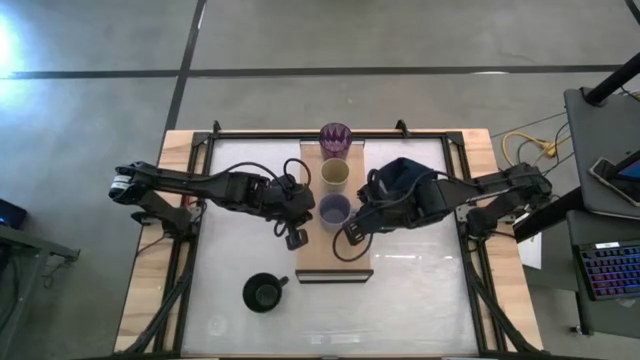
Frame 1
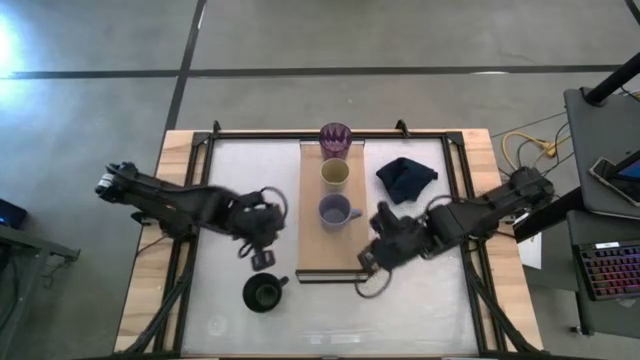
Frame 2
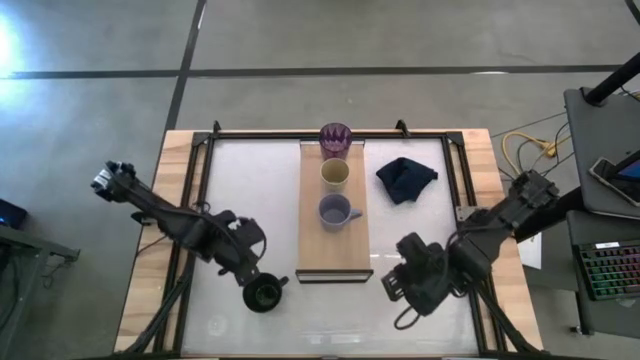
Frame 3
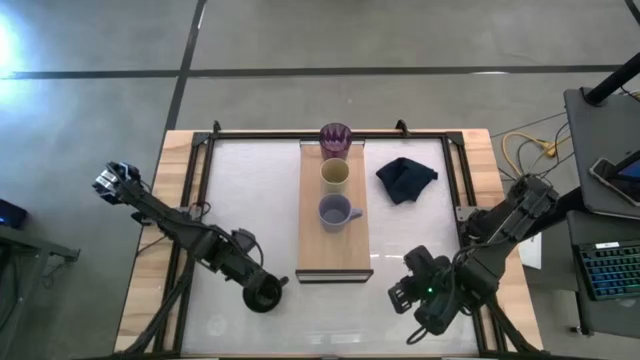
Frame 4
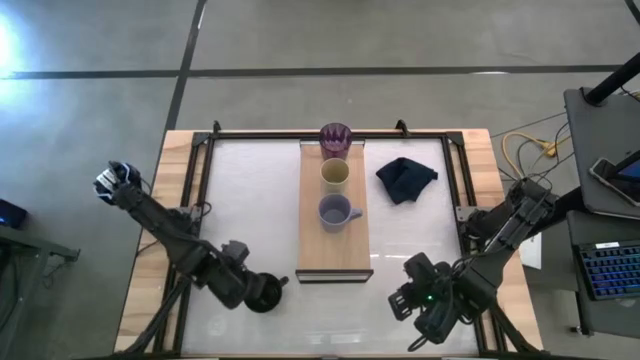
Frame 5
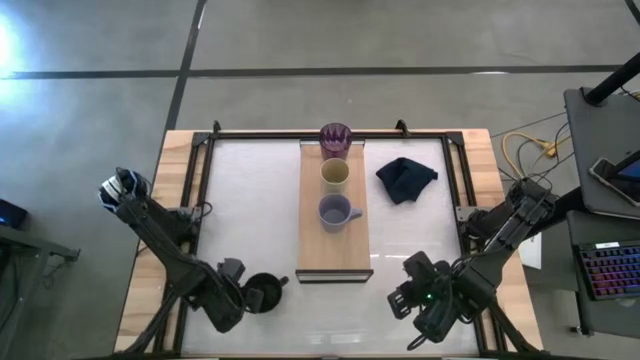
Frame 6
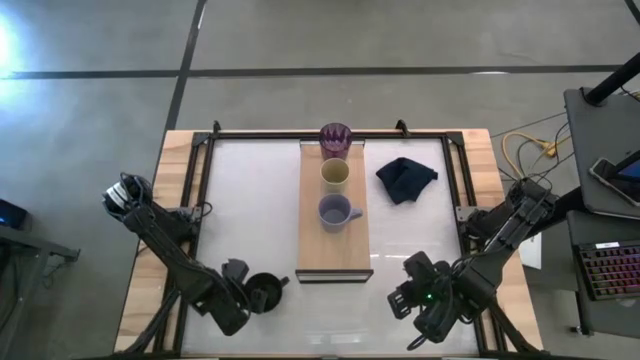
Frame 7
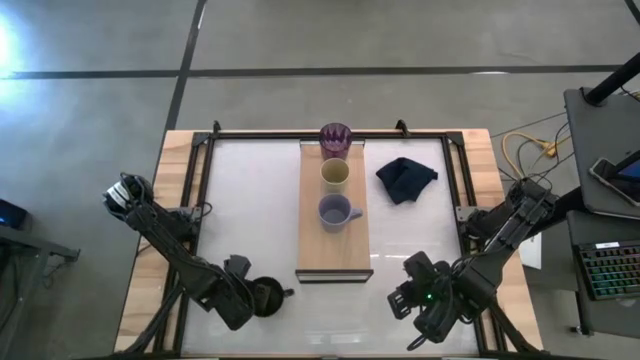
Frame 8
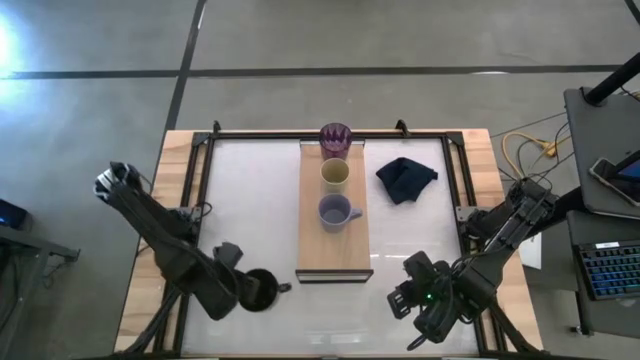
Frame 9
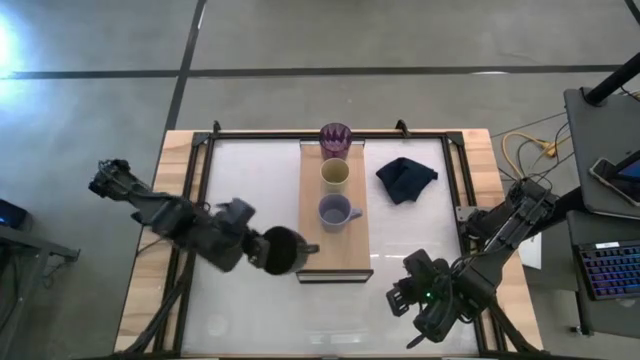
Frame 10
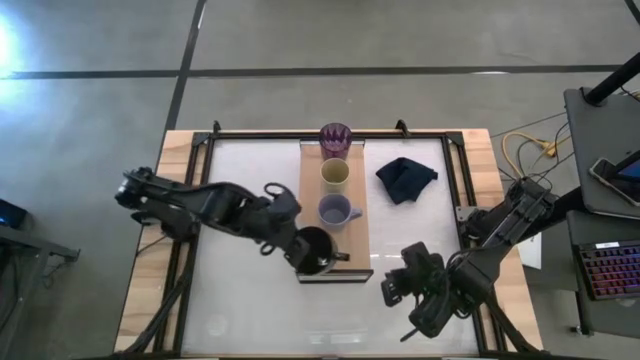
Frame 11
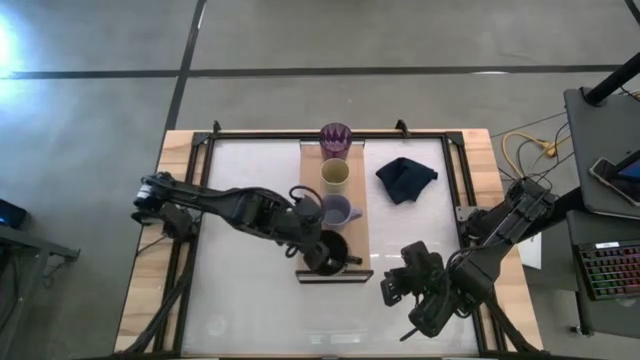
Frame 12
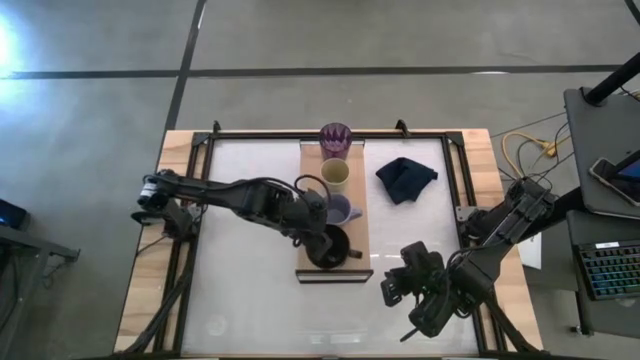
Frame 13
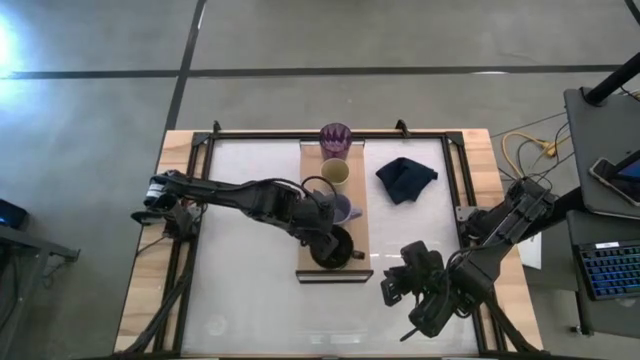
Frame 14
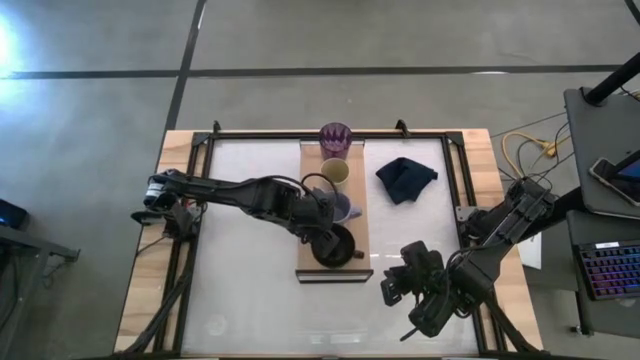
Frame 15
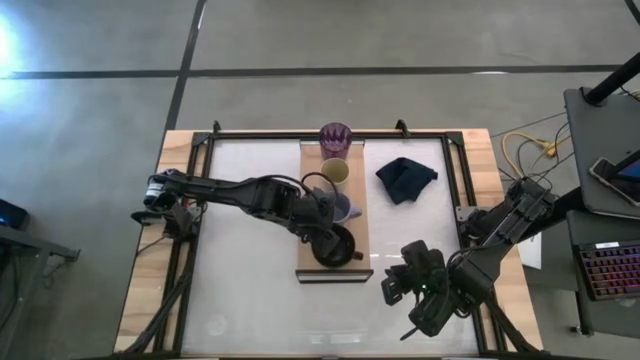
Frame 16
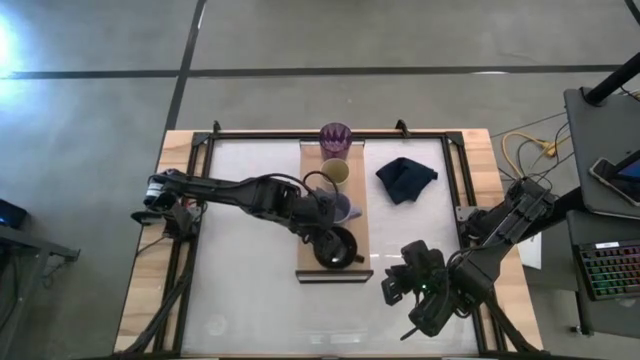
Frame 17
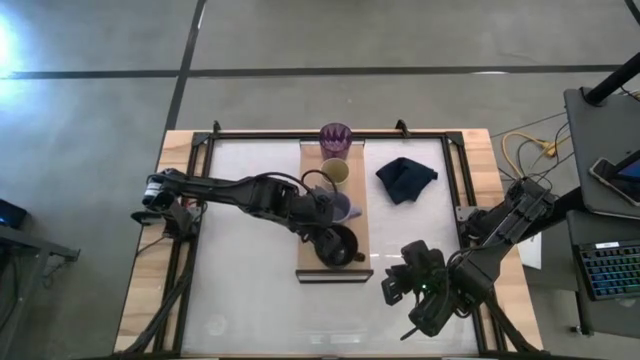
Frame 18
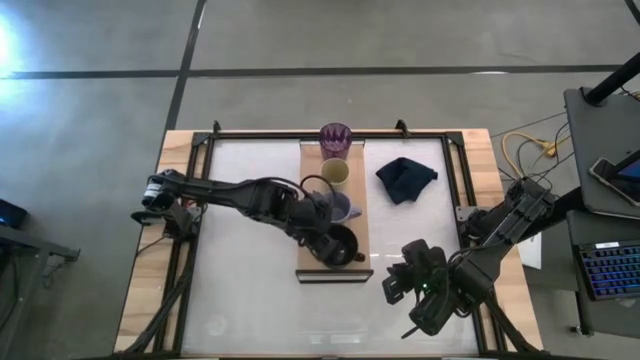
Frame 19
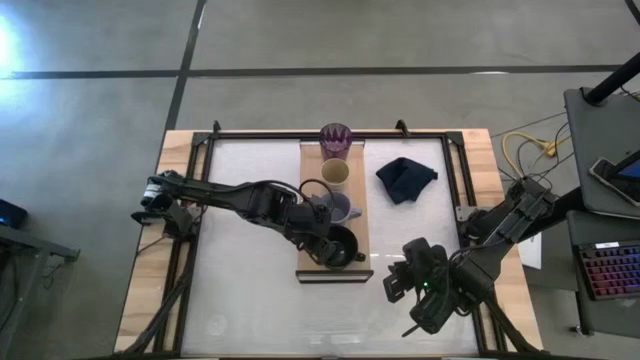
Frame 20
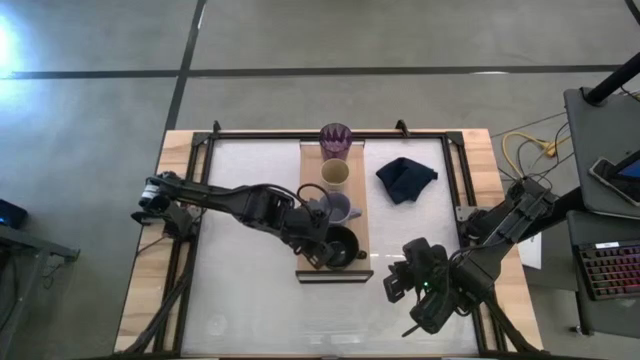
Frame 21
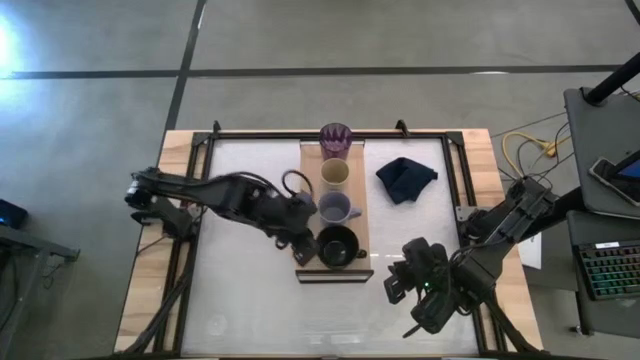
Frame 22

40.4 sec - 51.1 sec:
Task: Stack small to large cups/mugs on shelf
Put the black mug on the shelf

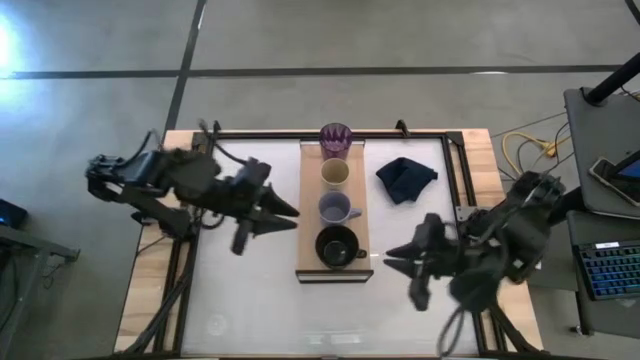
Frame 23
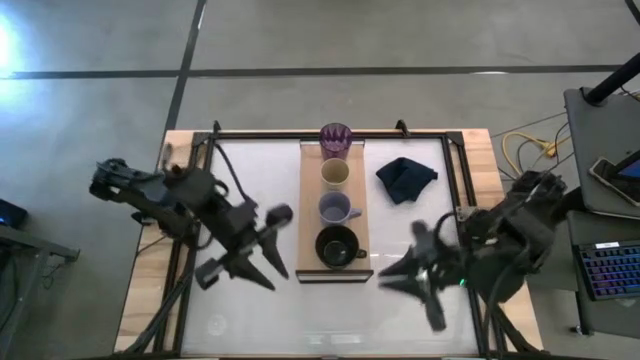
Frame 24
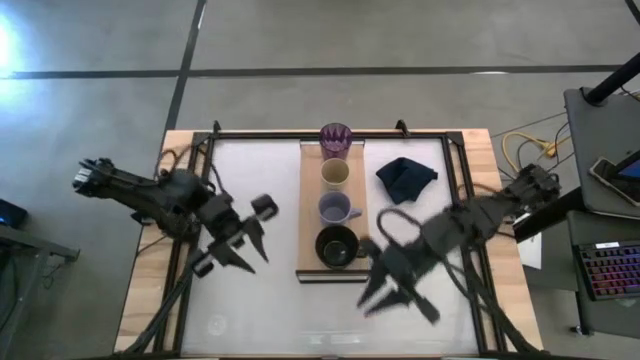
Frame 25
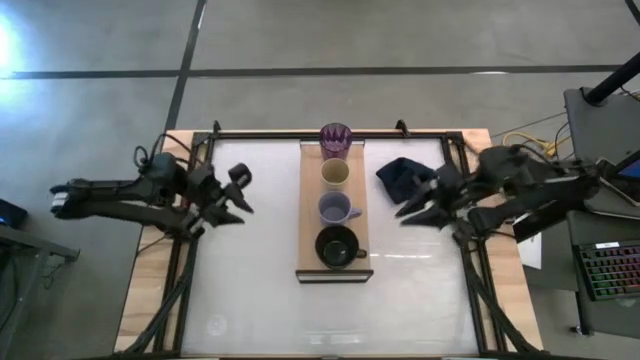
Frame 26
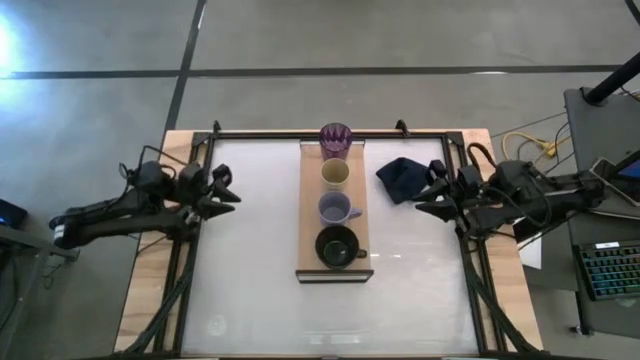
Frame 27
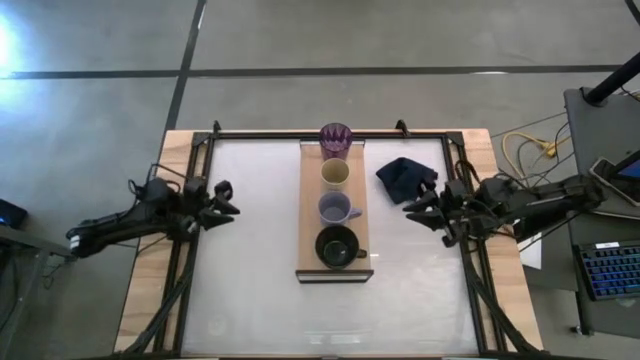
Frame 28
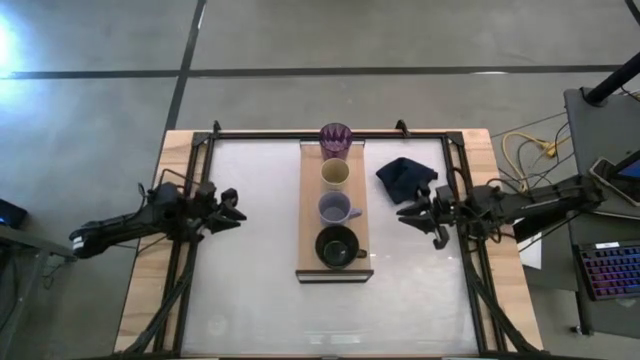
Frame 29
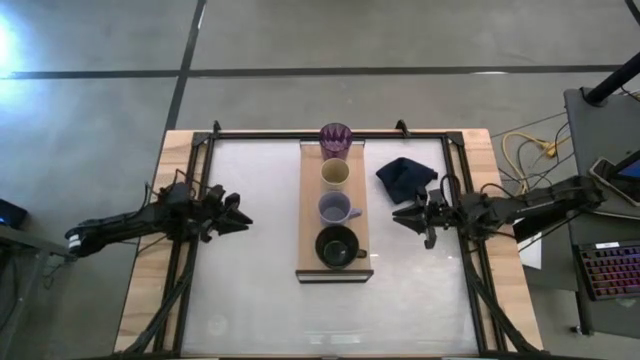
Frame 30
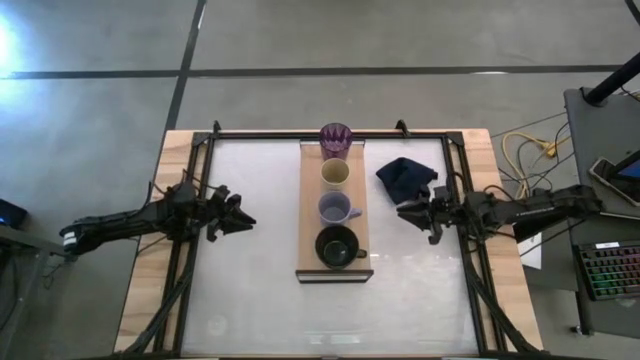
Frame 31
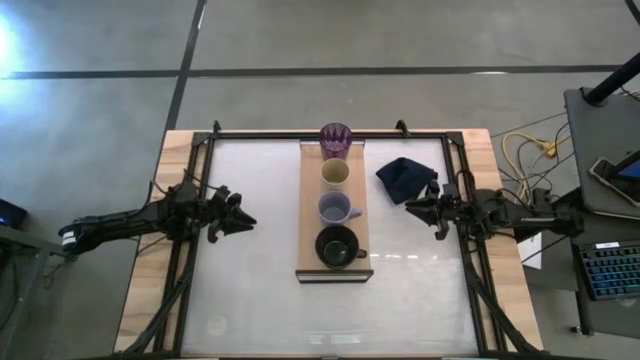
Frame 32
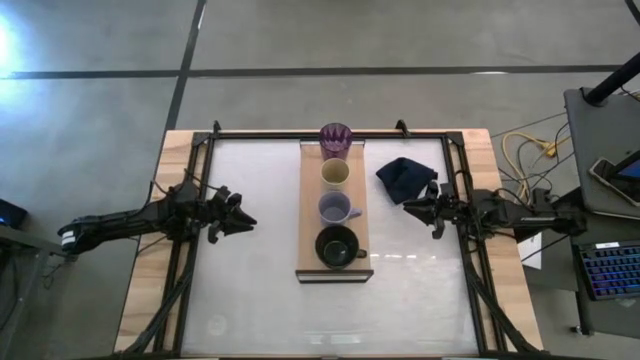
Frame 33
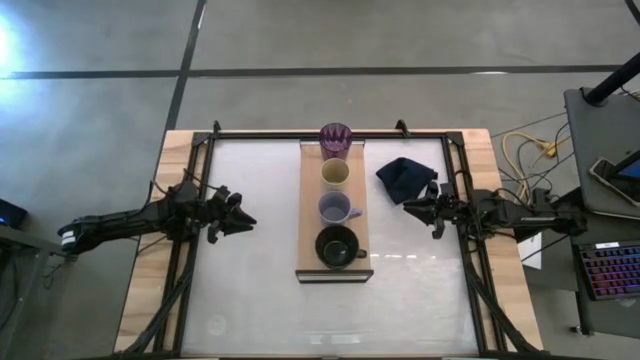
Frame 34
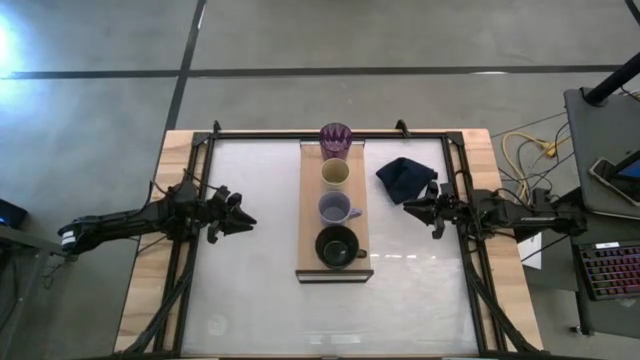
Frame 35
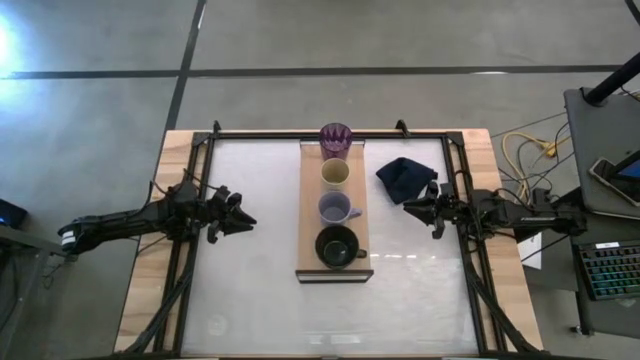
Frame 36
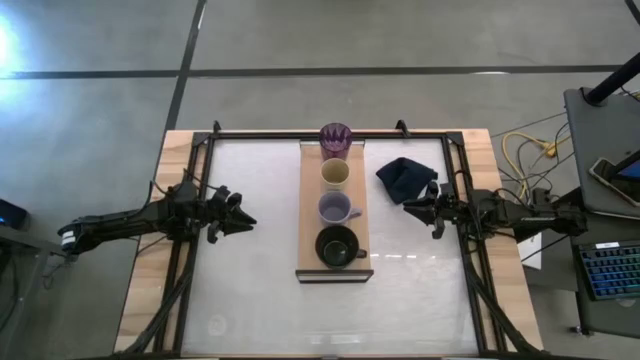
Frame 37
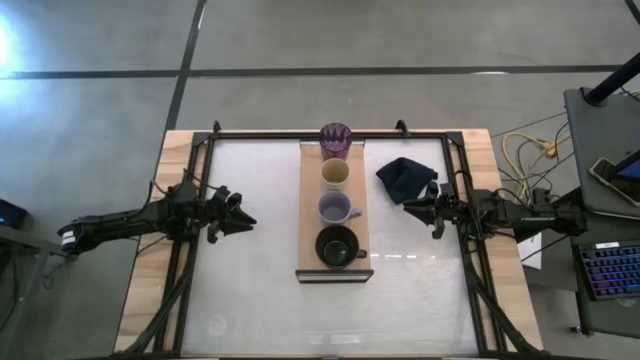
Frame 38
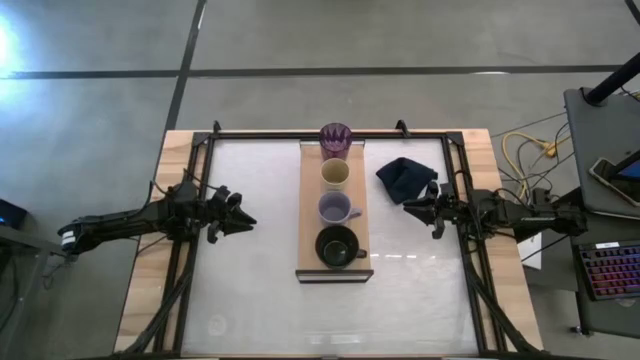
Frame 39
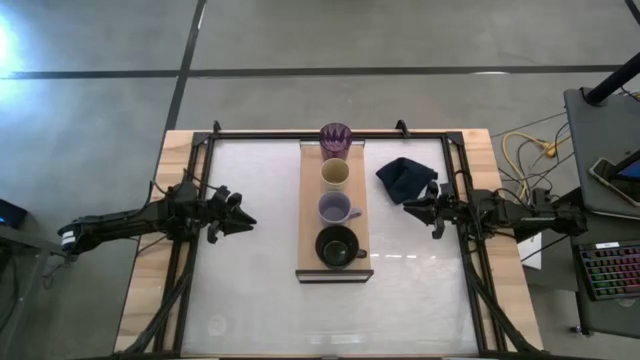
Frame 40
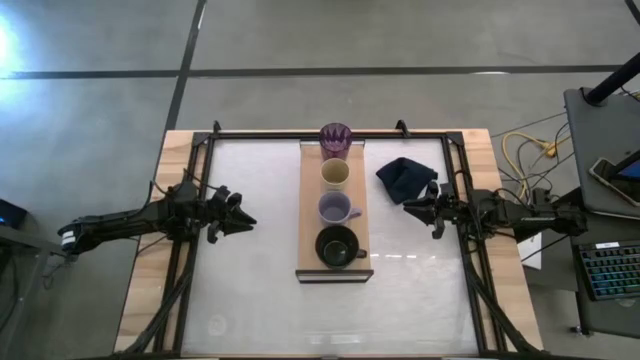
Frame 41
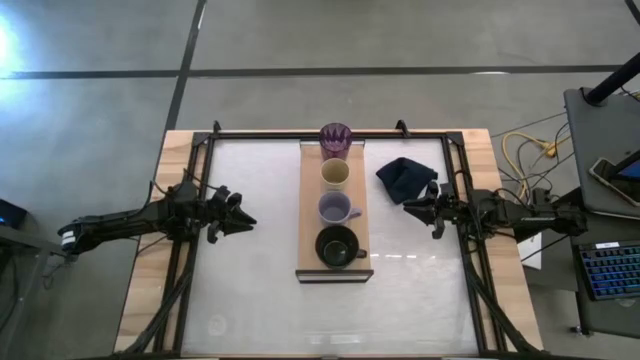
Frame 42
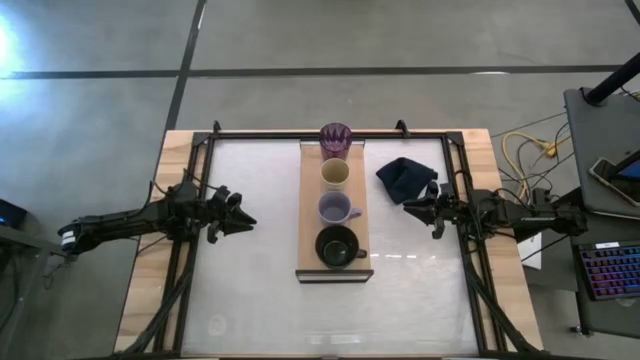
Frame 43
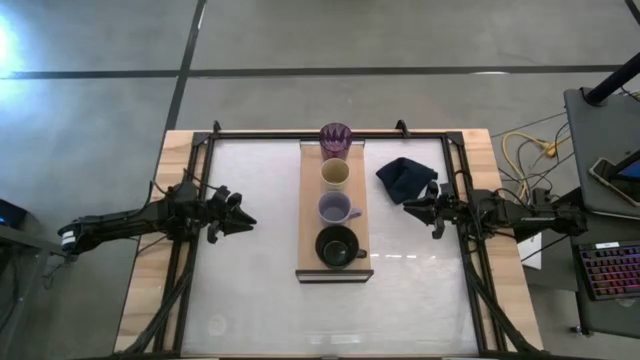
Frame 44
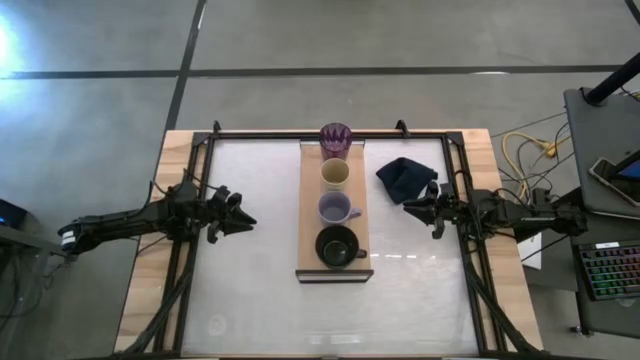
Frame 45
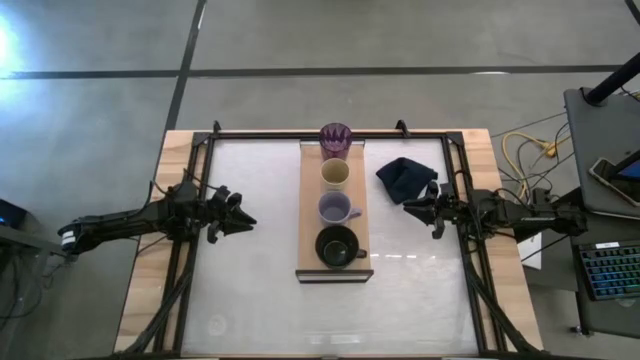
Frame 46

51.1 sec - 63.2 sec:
Return to Home Position
